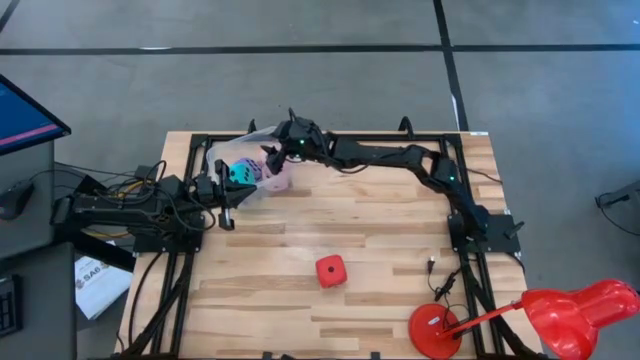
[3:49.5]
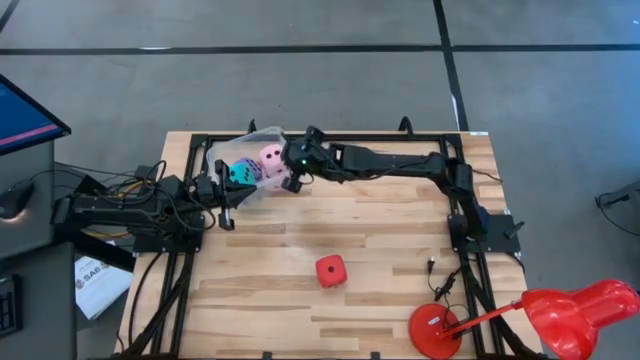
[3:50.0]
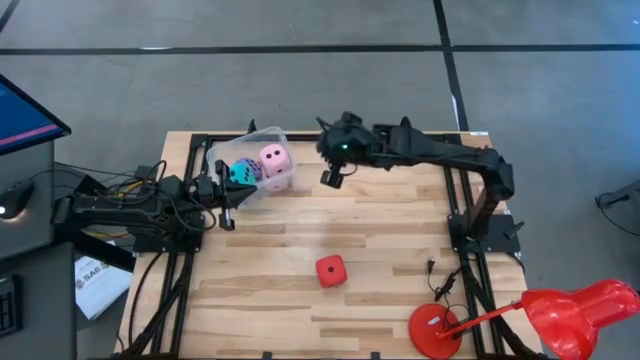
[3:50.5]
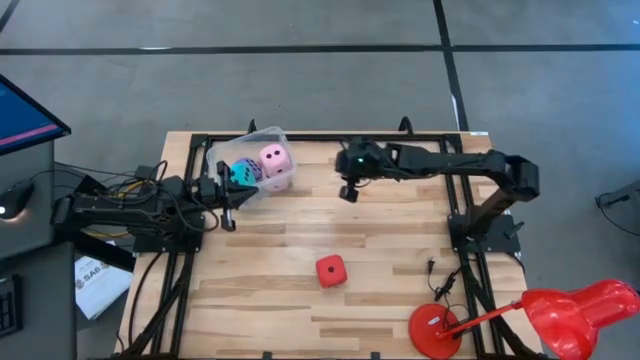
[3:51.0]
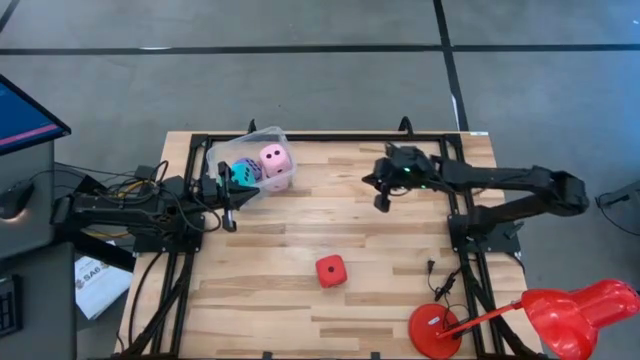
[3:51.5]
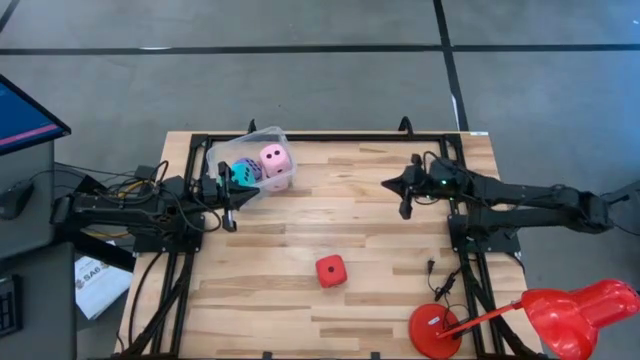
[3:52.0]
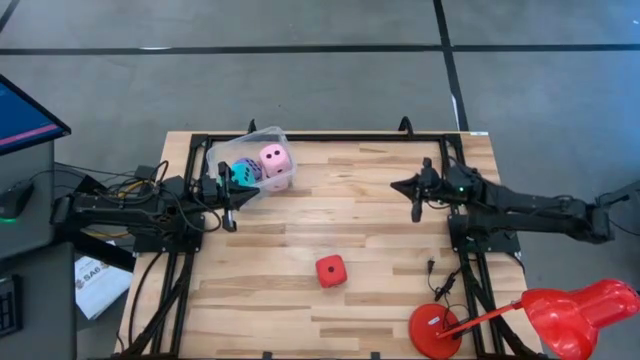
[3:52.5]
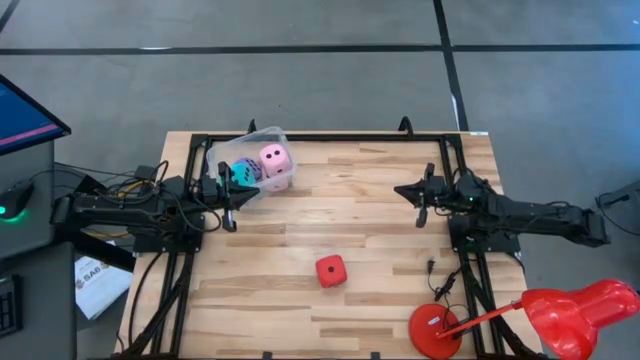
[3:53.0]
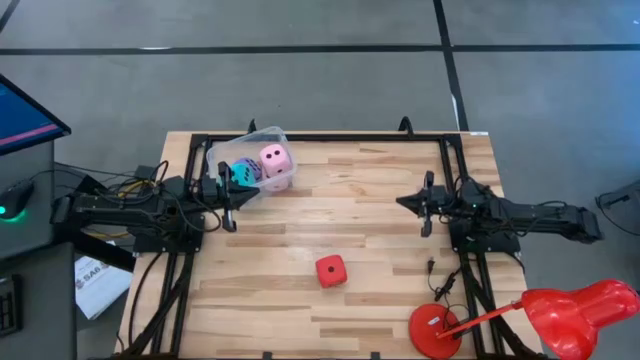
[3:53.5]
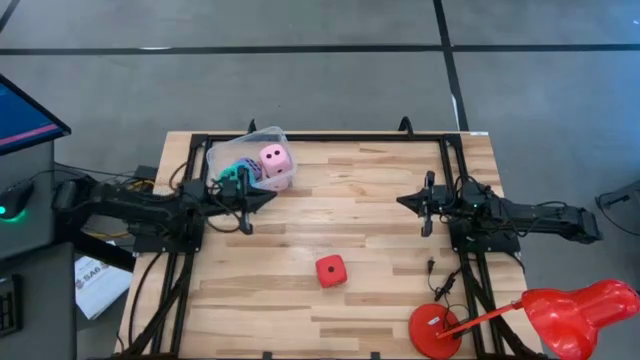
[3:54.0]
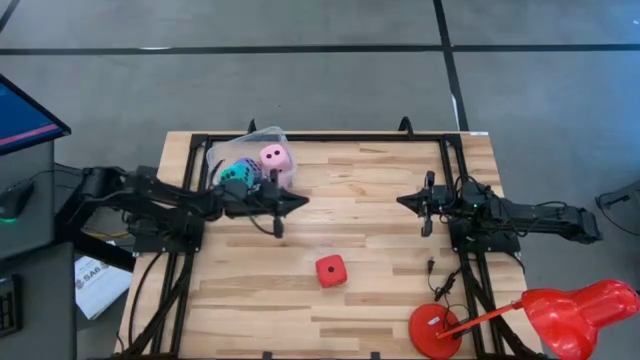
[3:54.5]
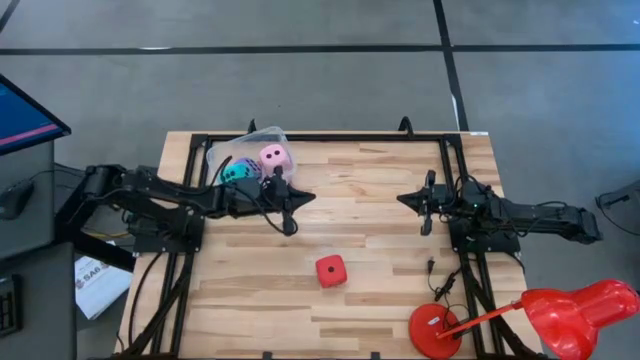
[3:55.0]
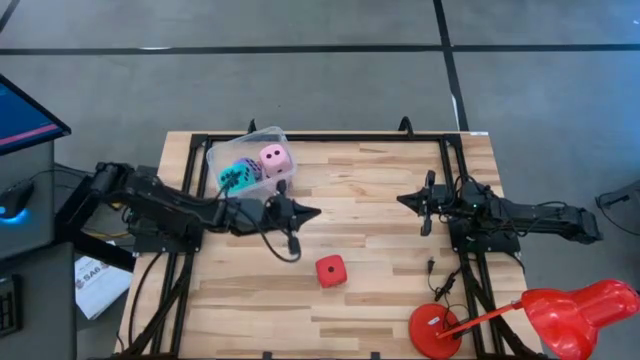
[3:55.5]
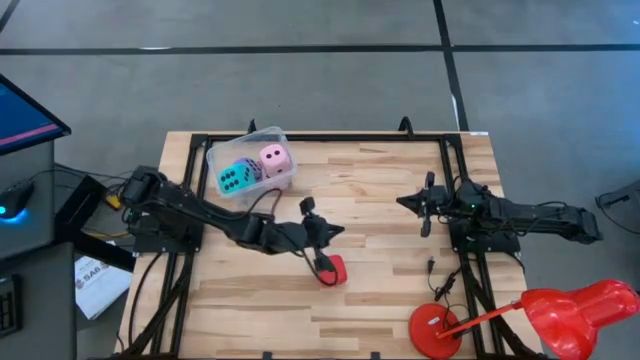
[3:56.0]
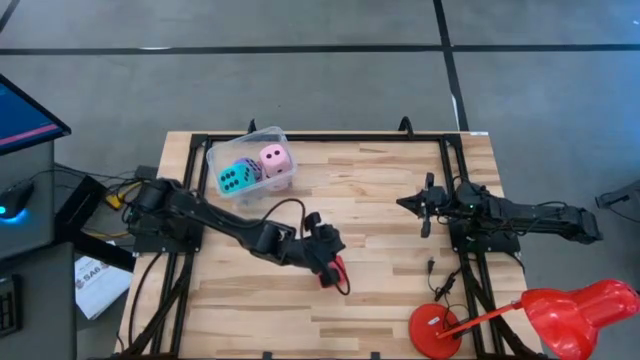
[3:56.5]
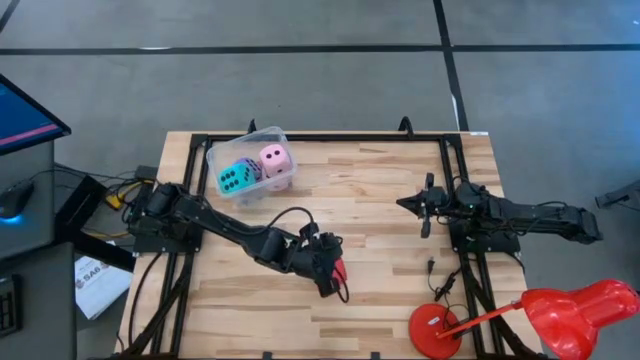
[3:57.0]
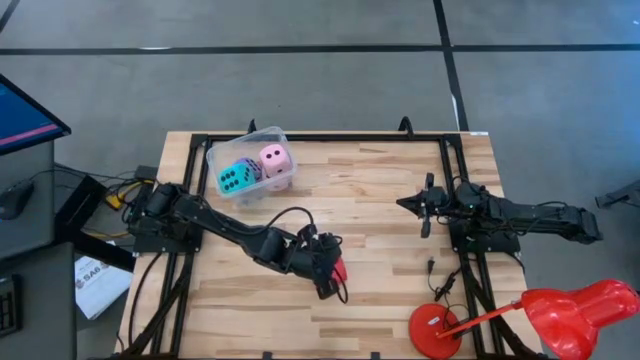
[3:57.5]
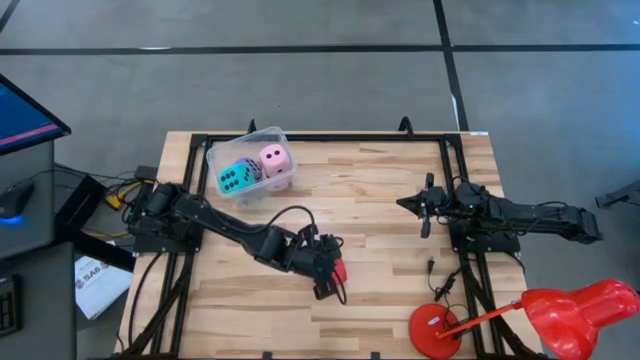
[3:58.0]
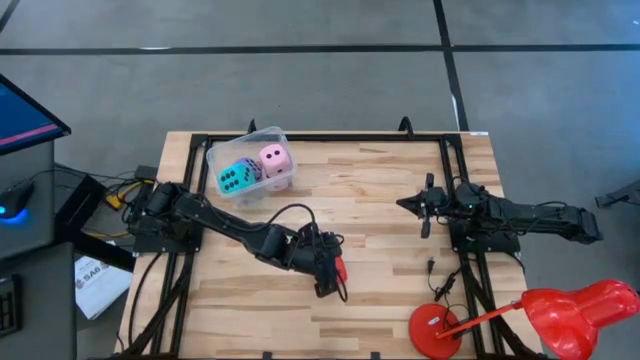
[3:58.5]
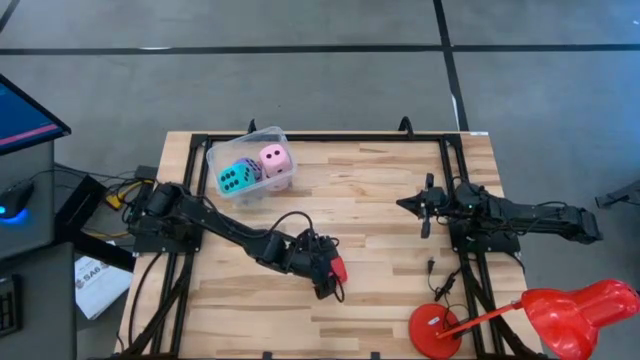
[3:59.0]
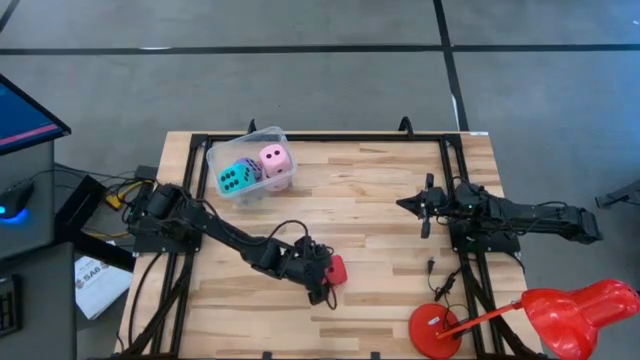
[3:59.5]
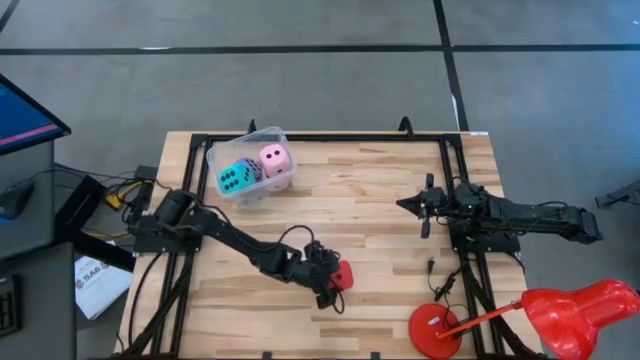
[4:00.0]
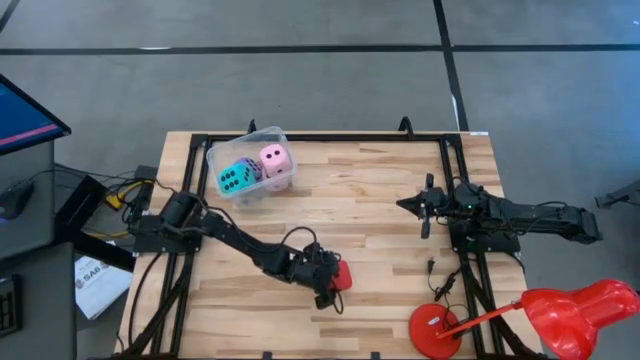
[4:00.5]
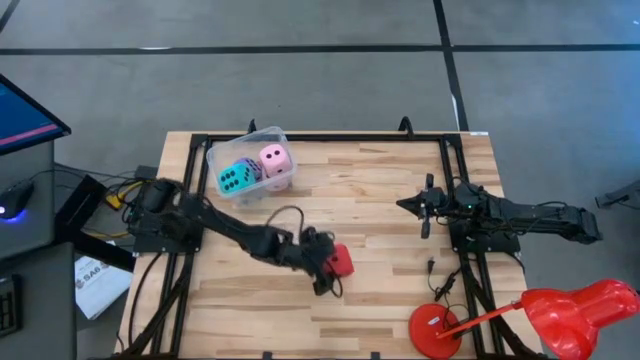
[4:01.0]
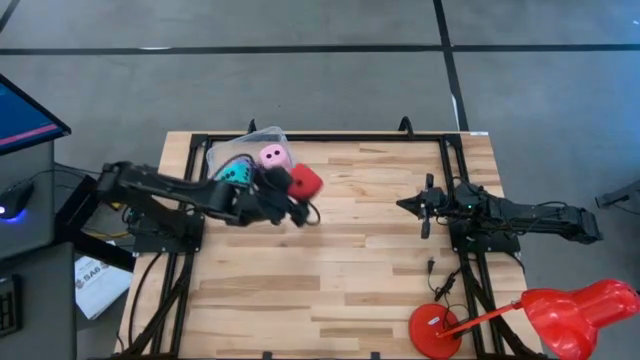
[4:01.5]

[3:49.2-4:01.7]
Task: Pick & Place Dice
Put the large red dice into the transparent container

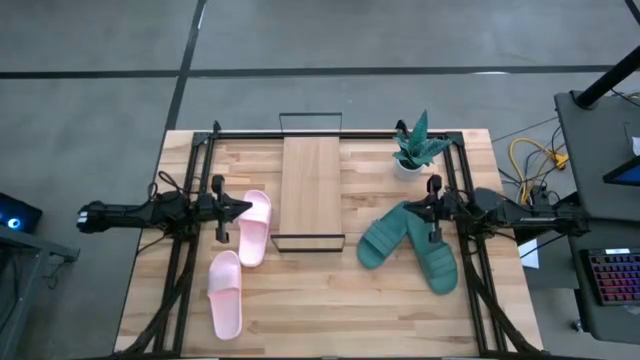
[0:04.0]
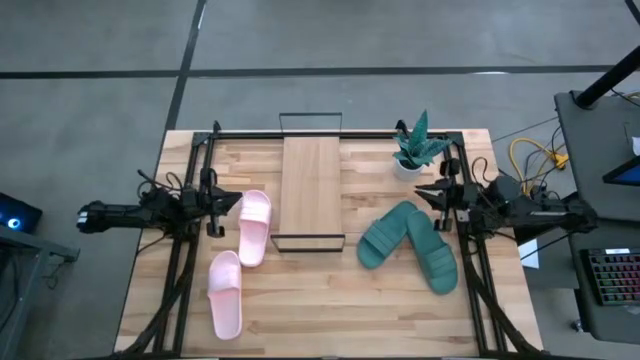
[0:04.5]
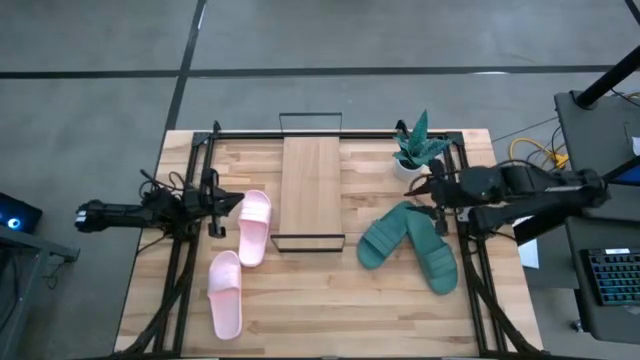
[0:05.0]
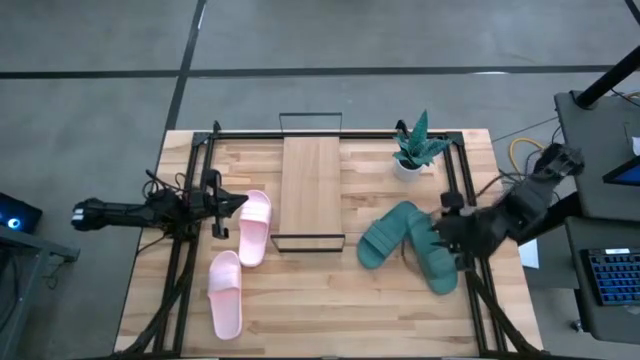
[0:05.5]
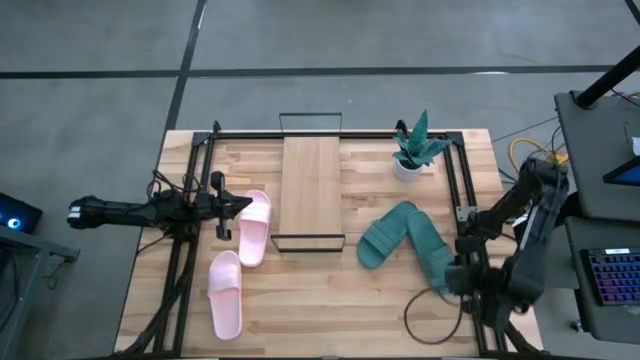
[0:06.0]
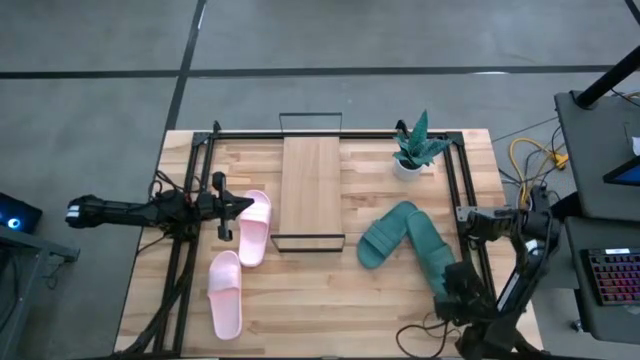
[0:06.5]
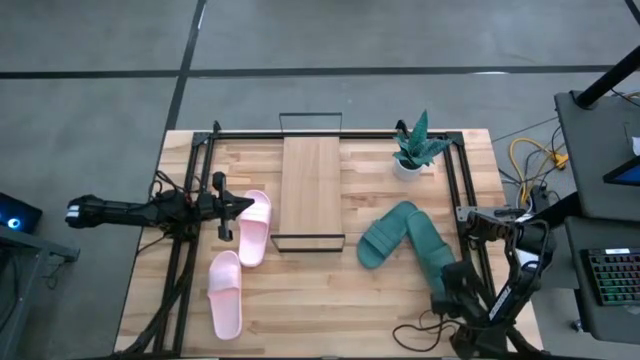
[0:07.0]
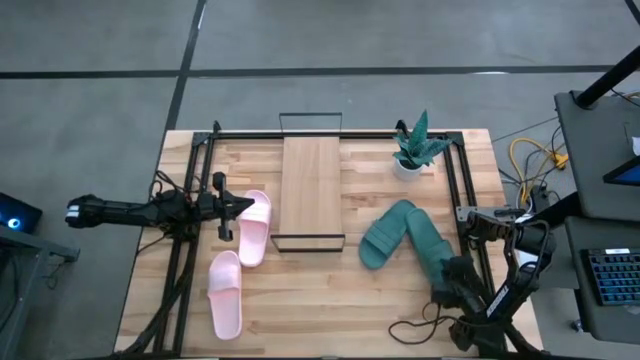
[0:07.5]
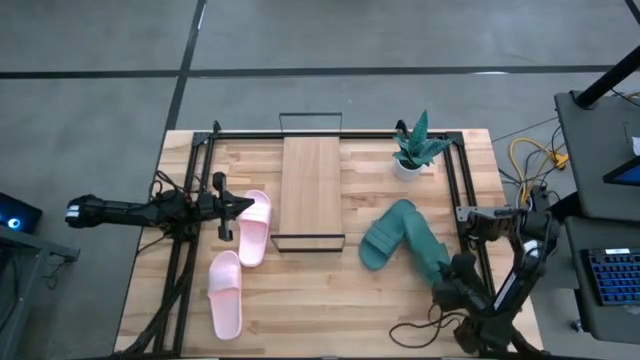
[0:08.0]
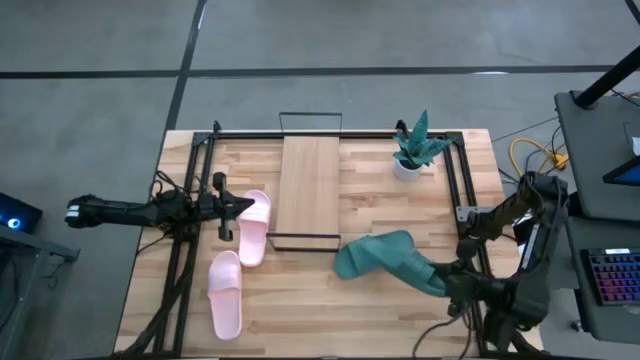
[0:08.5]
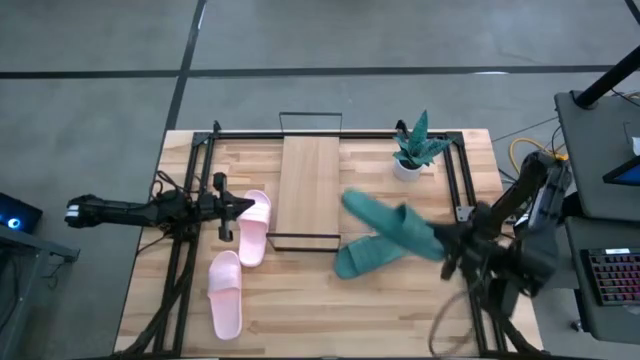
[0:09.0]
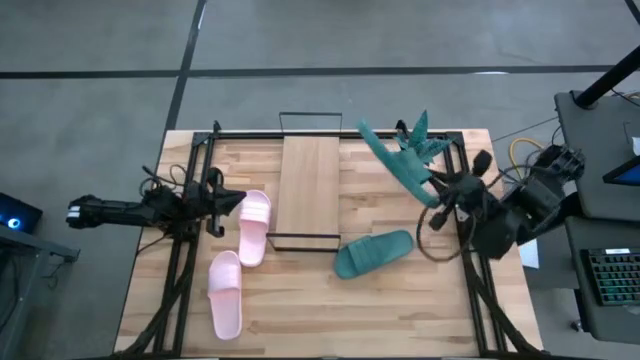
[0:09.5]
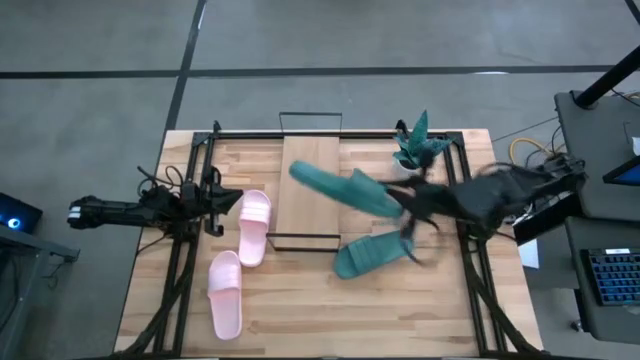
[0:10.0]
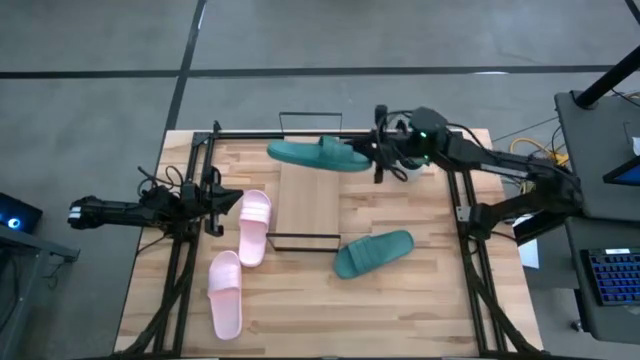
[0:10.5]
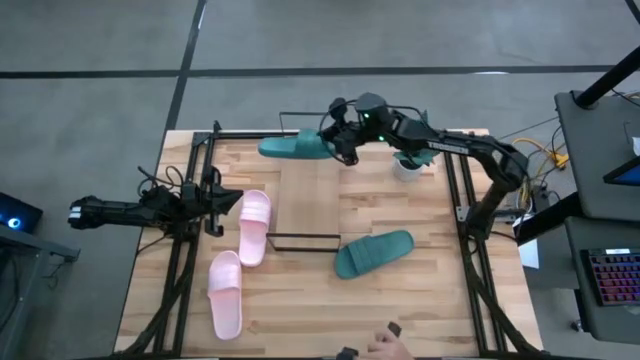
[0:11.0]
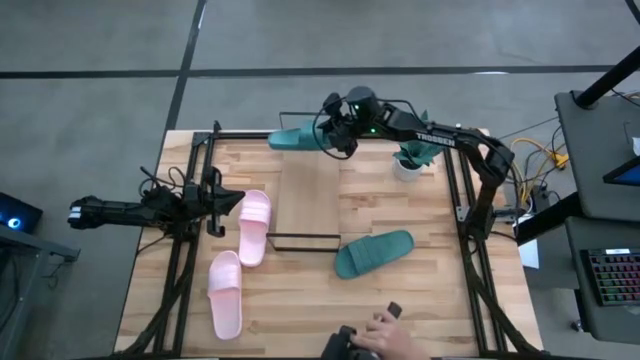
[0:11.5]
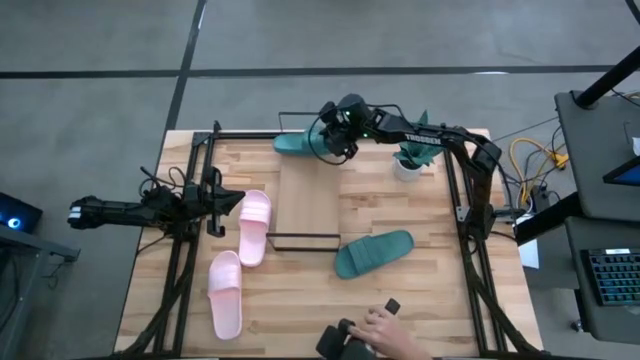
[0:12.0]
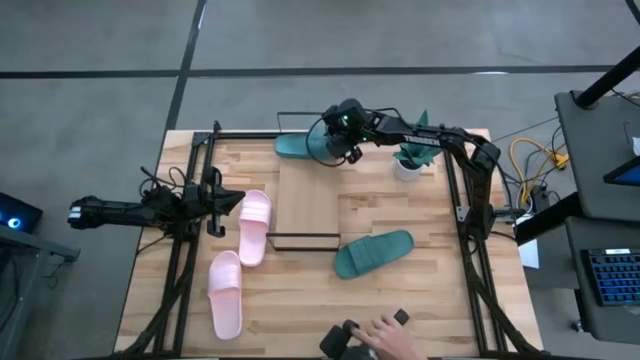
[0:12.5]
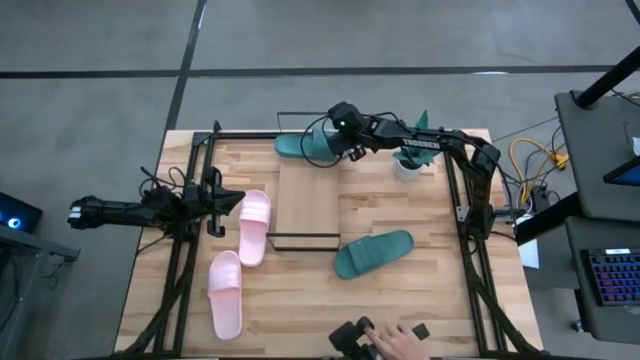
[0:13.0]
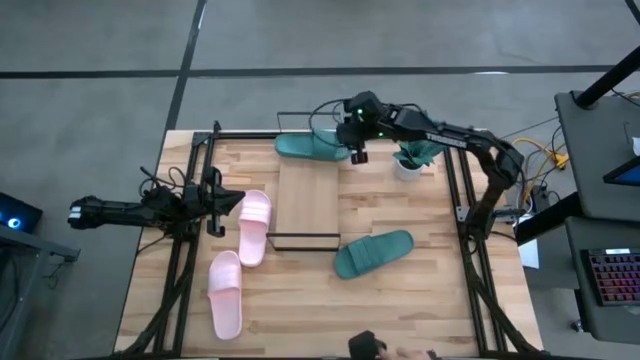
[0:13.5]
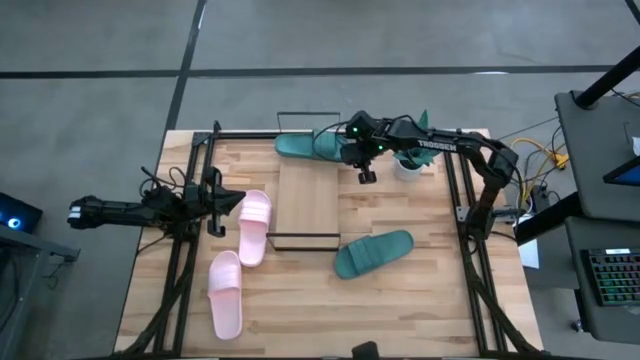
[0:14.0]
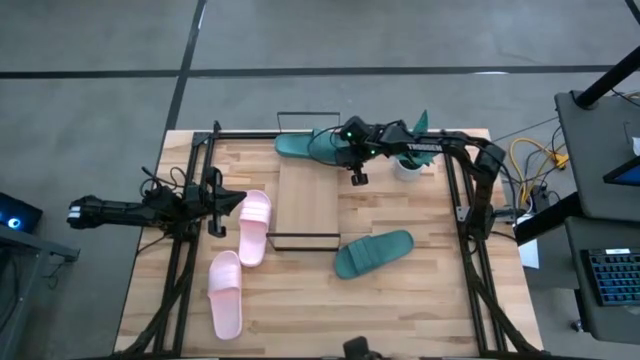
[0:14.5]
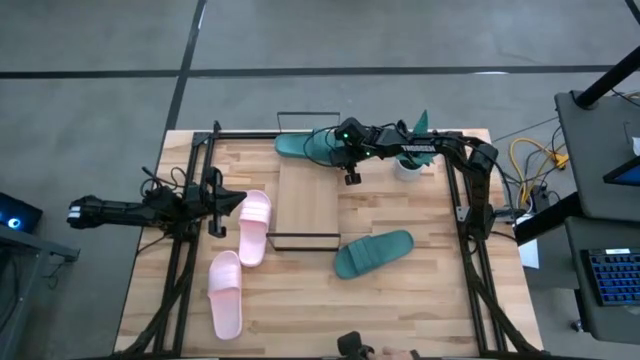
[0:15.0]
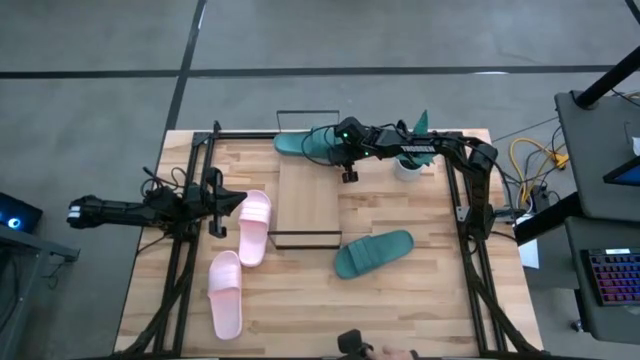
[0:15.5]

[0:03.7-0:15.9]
Task: Pick and place slides into the shelf
Put the right green slides on the shelf
